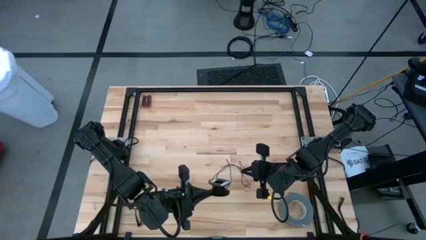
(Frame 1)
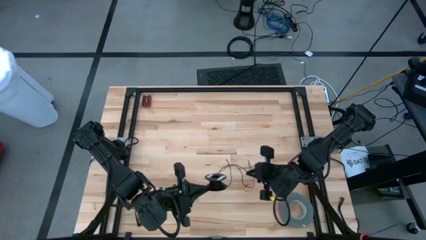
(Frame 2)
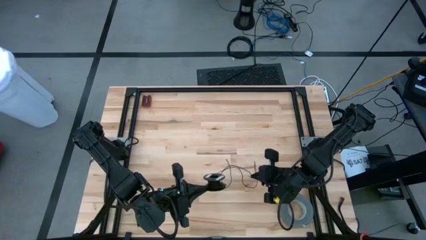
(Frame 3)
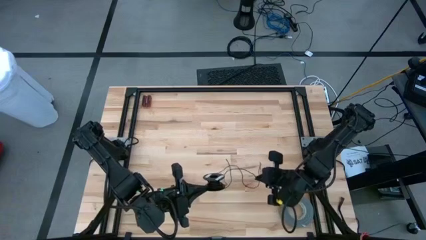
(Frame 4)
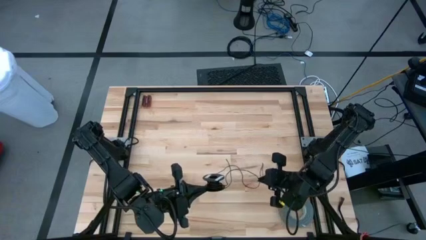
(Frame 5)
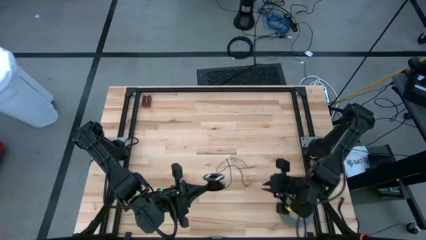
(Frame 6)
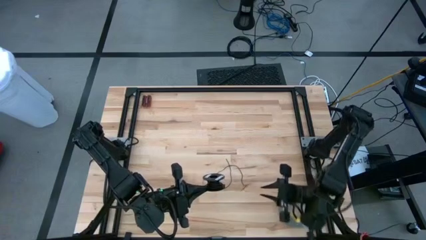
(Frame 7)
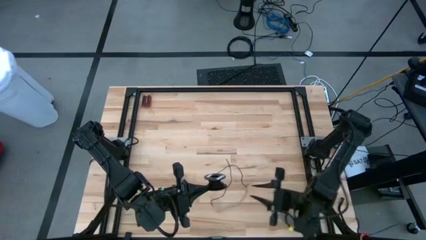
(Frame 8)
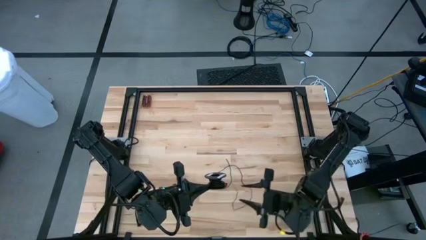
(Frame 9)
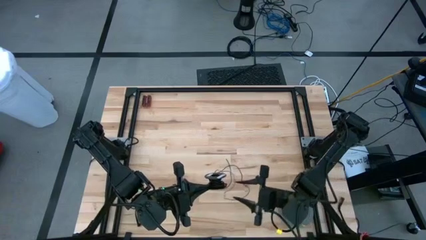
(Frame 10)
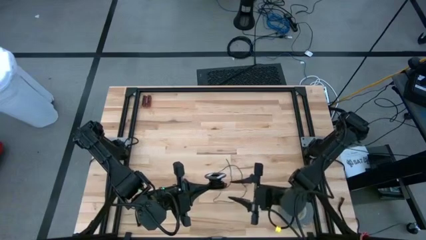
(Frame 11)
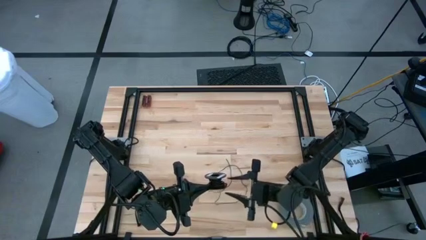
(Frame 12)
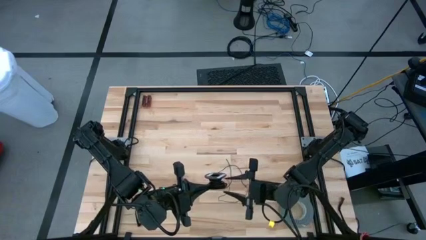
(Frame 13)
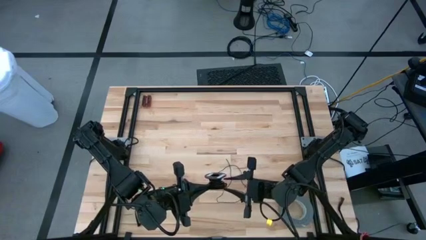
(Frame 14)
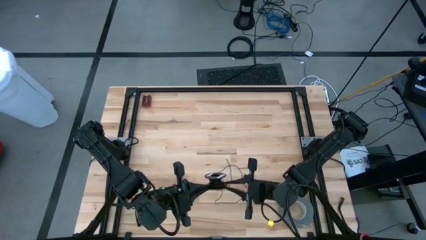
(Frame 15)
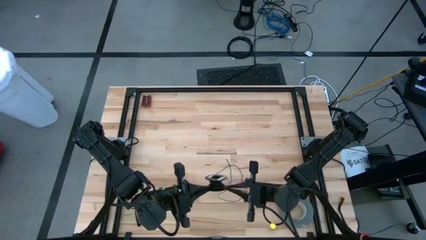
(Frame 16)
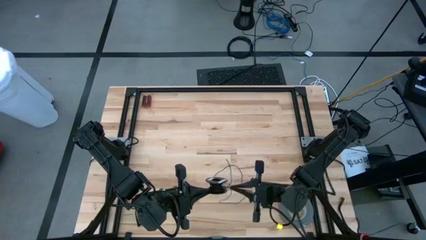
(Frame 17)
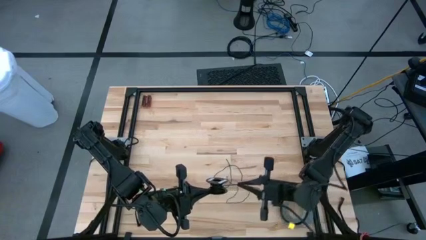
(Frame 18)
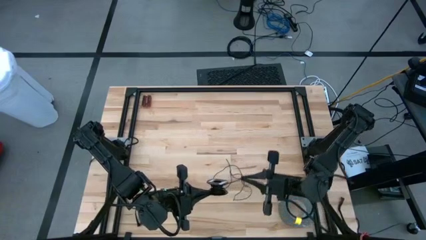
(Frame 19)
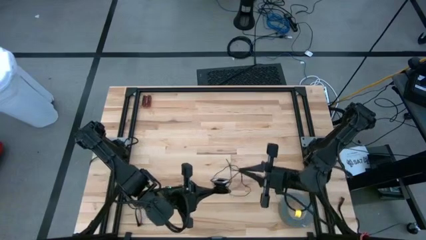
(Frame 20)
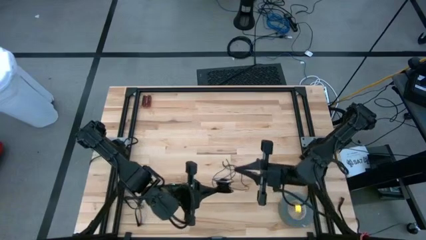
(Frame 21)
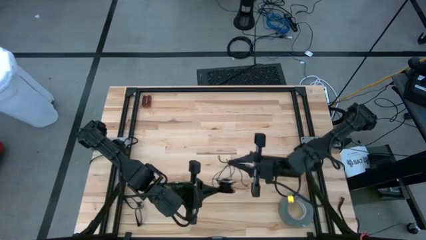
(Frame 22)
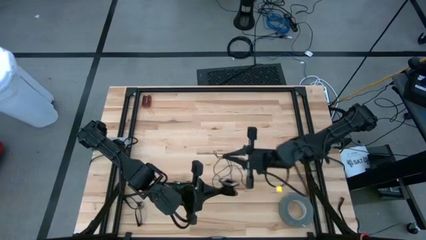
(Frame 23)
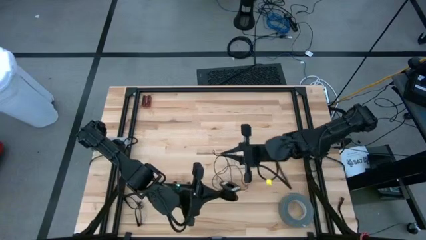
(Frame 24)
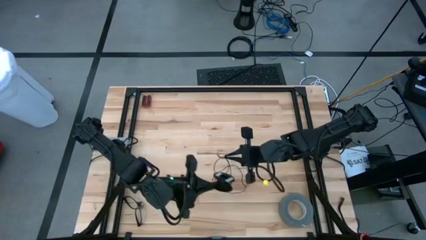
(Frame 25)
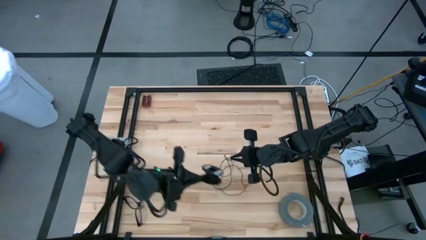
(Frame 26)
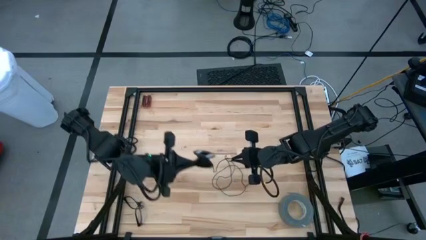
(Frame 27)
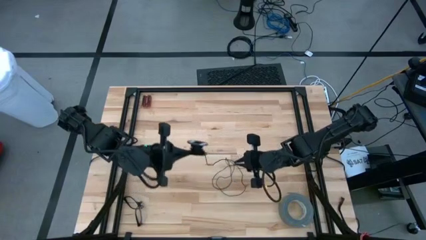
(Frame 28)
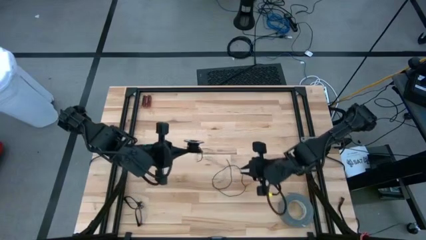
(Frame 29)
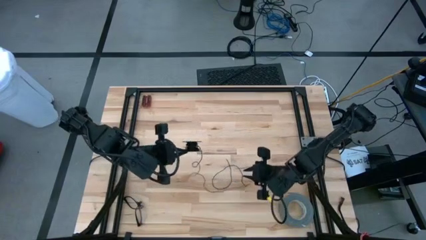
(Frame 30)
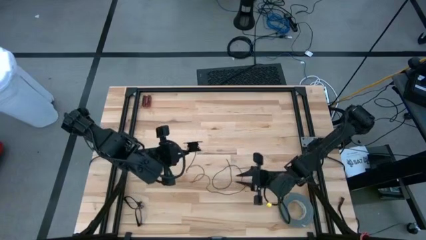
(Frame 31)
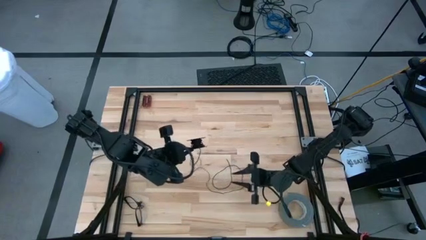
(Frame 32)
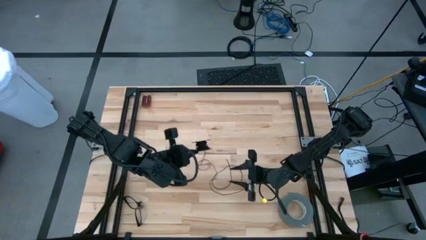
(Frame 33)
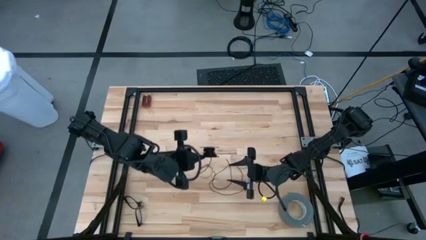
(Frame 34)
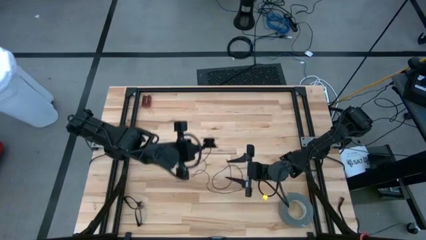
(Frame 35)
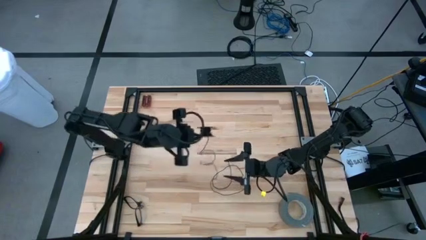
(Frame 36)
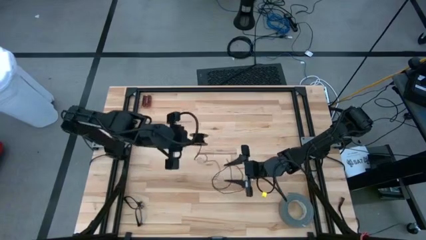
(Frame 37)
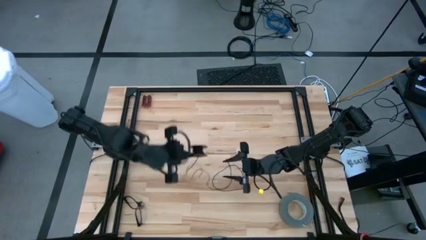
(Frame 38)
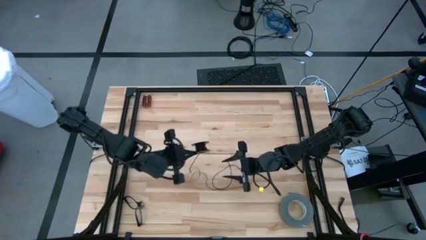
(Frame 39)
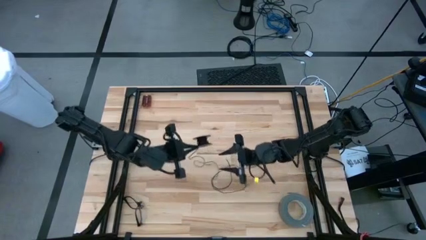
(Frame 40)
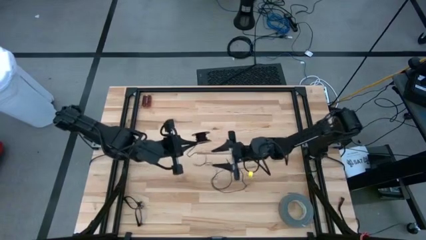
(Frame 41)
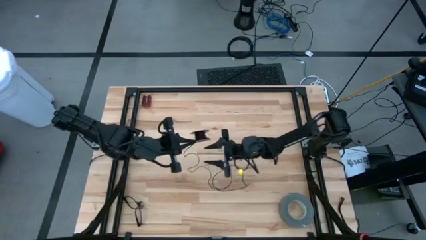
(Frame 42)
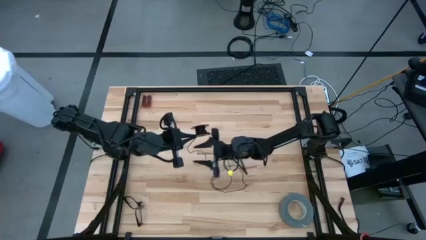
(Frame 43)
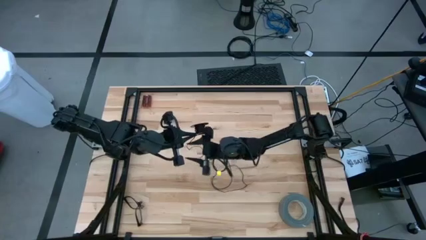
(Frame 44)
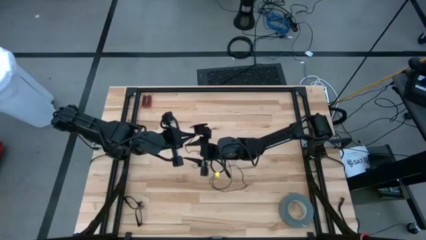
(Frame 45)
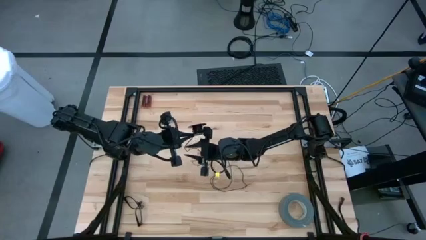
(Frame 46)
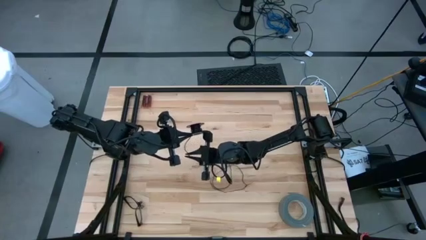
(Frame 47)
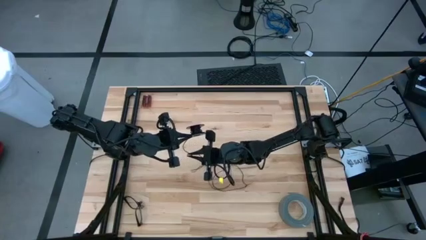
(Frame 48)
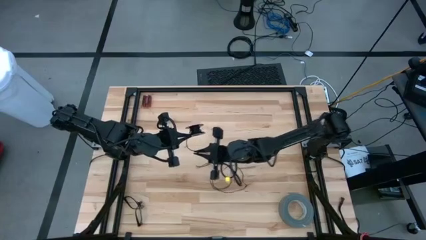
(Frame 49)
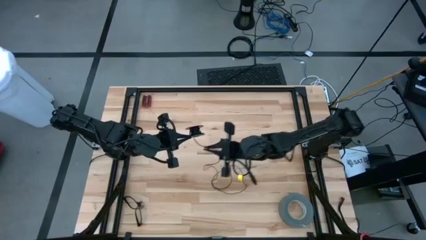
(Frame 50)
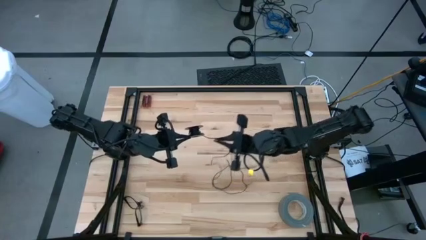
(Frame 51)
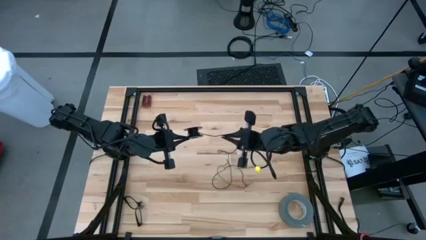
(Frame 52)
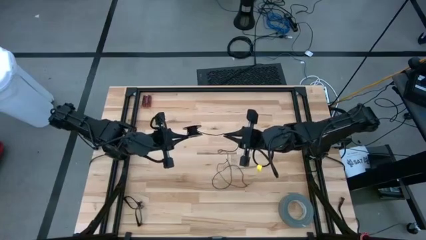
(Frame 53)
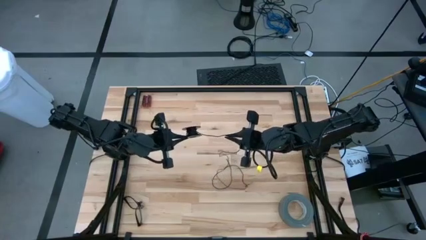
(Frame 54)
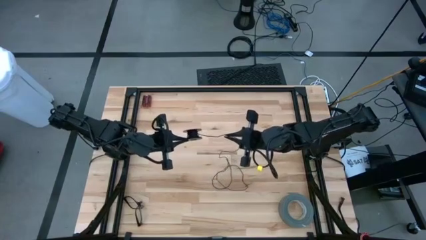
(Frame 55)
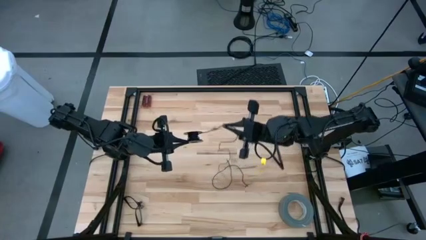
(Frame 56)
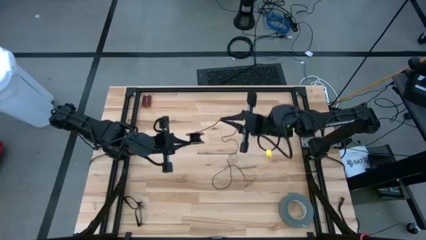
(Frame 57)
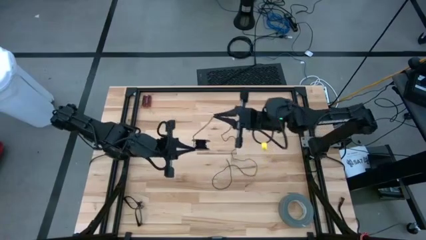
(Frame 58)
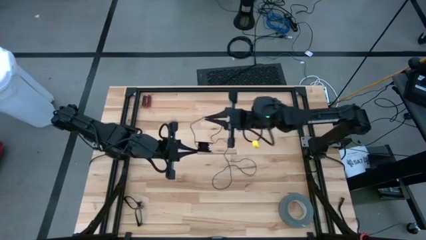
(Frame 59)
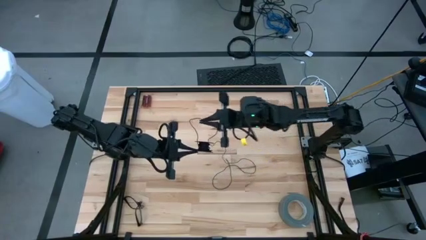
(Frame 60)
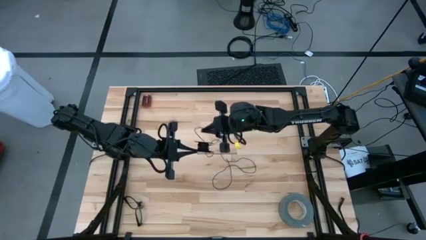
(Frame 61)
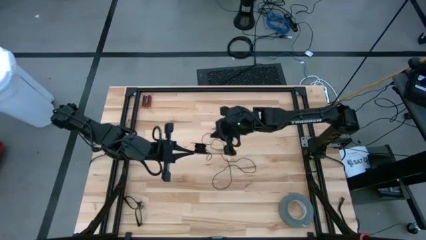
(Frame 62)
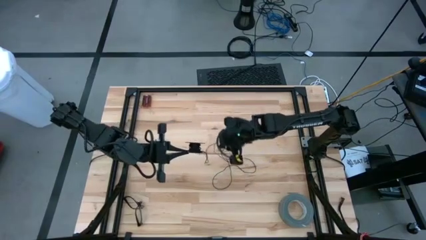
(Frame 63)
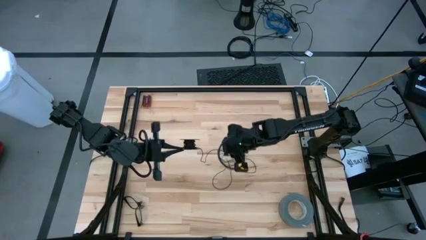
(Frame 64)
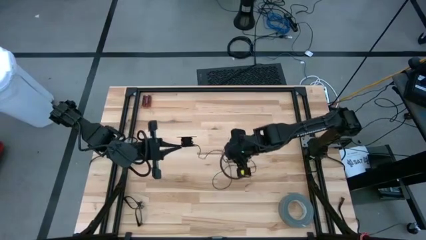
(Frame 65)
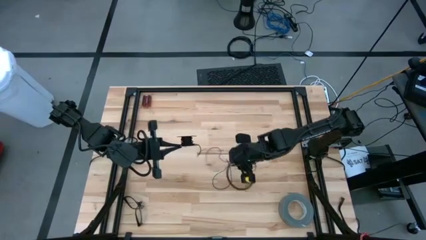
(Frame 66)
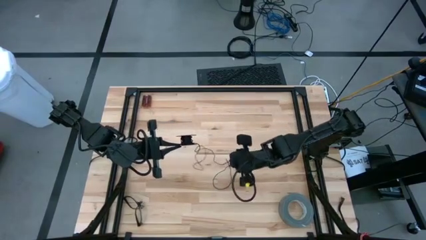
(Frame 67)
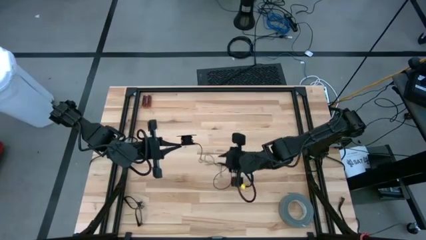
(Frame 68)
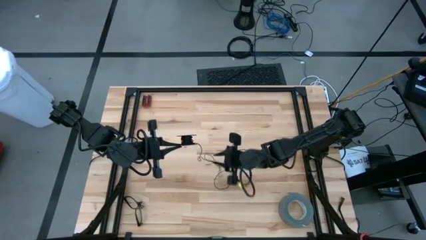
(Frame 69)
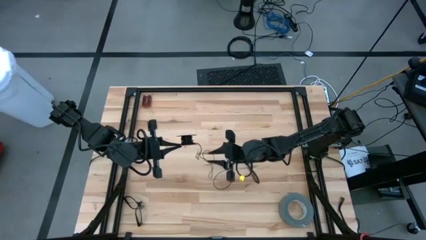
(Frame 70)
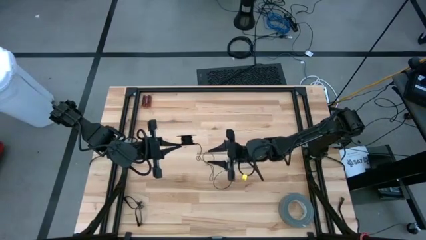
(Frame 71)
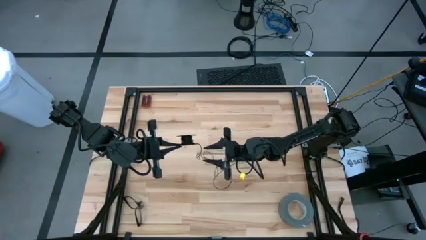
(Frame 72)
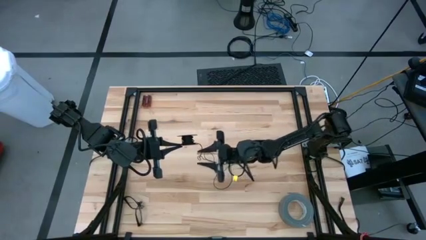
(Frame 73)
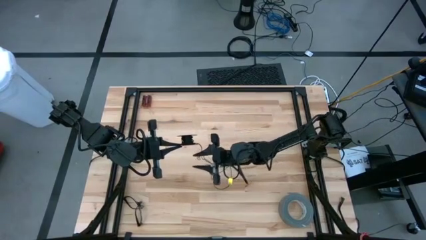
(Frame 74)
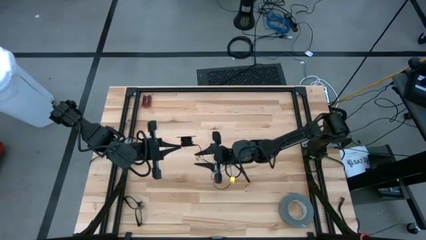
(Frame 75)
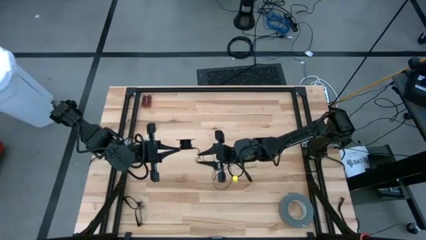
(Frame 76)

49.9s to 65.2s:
Task: Coil cords
Uncoil the black wire from the spool

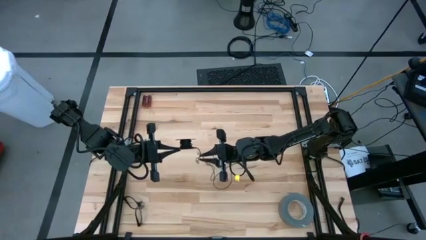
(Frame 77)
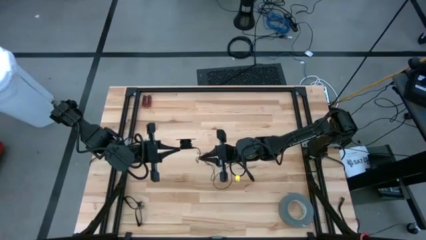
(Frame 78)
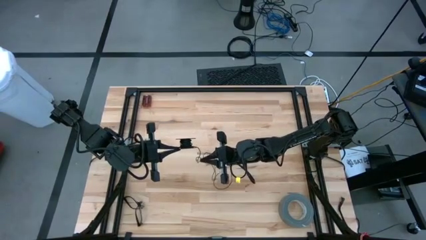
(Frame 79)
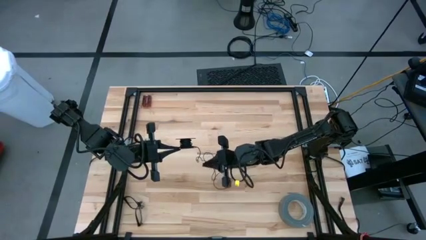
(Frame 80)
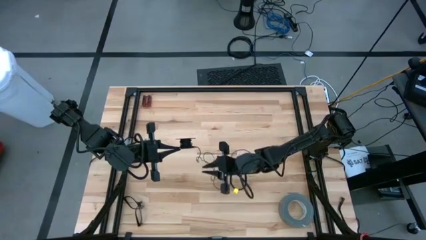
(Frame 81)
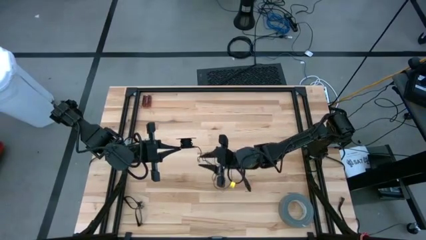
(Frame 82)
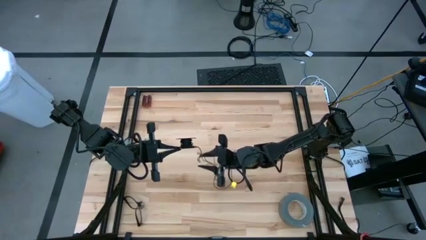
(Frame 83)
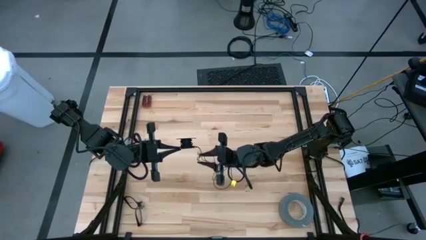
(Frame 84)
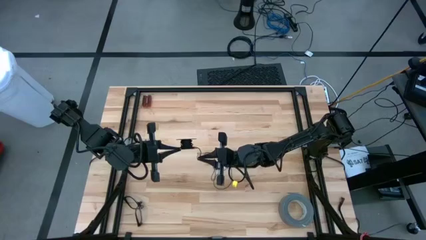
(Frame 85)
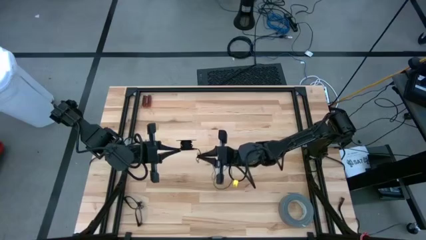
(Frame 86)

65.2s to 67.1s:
Uncoil the black wire from the spool
